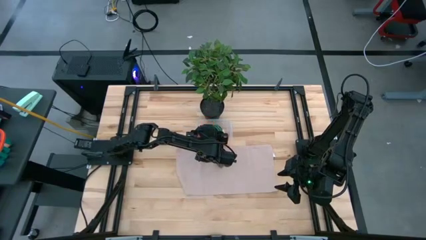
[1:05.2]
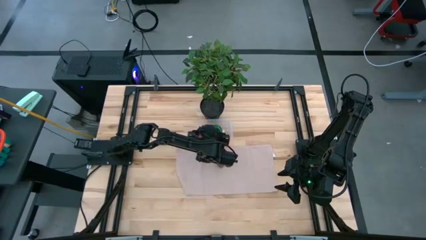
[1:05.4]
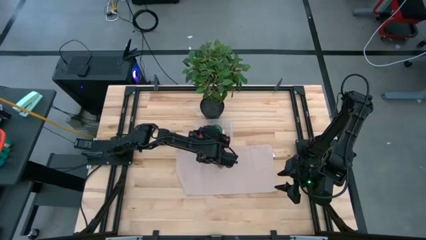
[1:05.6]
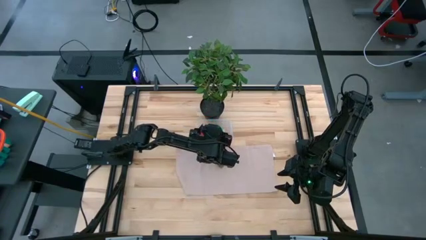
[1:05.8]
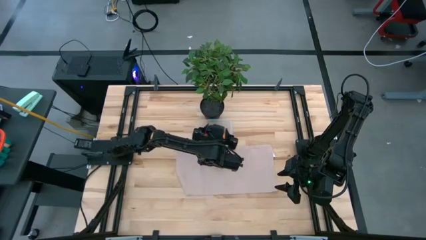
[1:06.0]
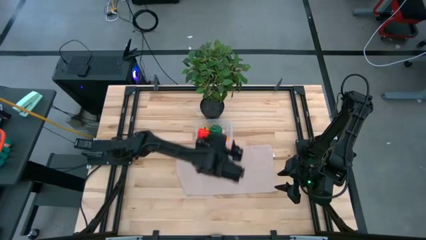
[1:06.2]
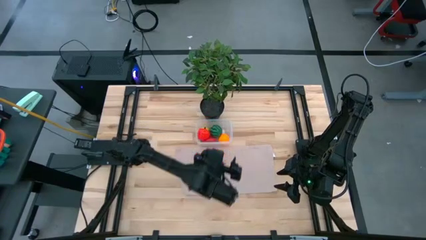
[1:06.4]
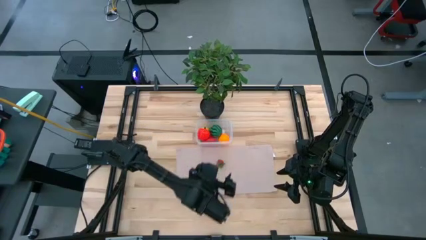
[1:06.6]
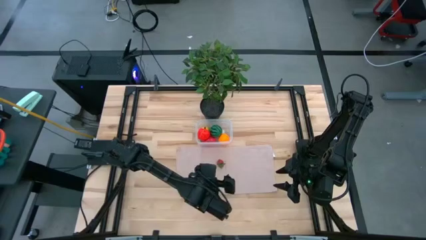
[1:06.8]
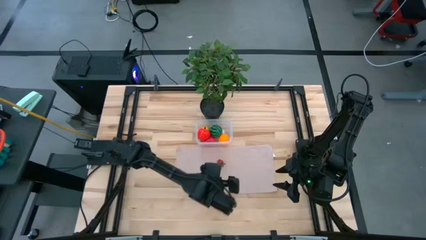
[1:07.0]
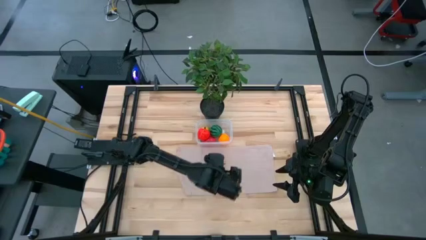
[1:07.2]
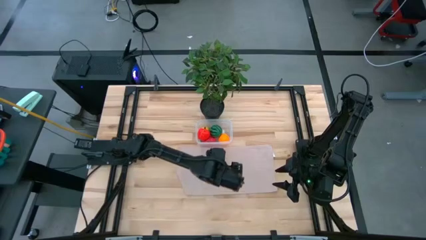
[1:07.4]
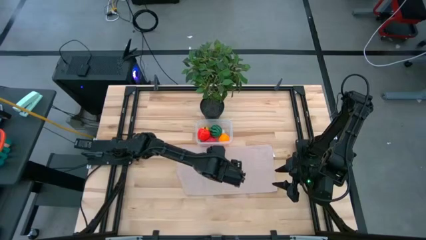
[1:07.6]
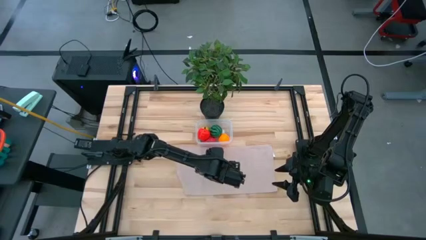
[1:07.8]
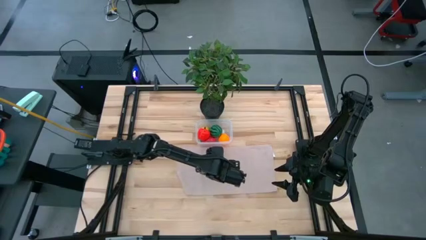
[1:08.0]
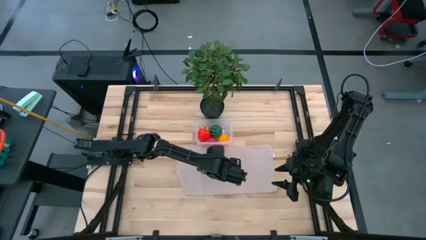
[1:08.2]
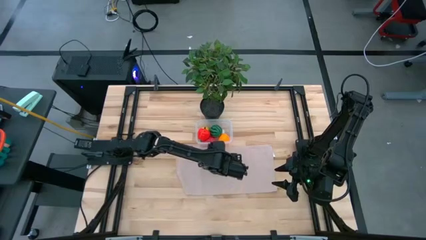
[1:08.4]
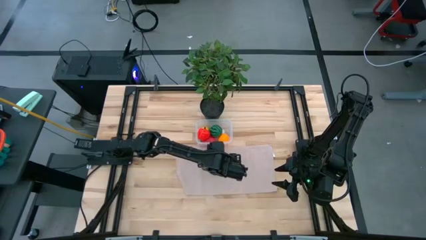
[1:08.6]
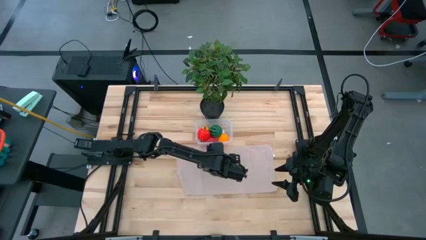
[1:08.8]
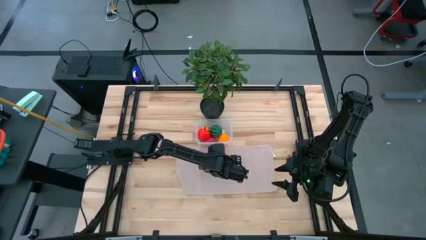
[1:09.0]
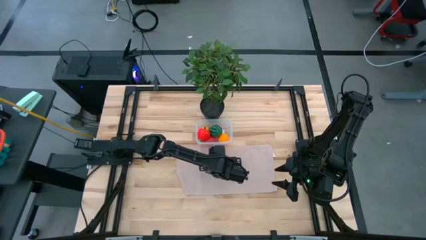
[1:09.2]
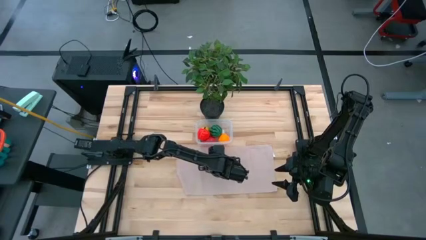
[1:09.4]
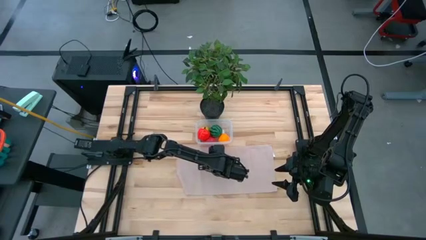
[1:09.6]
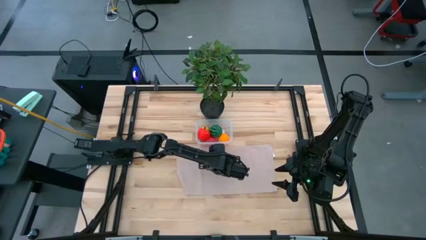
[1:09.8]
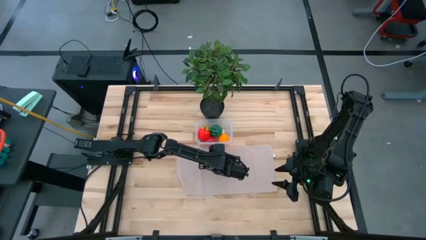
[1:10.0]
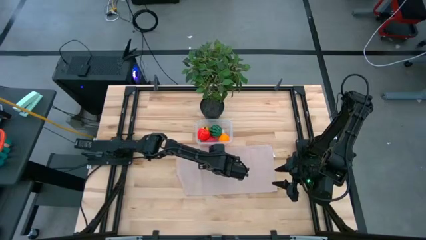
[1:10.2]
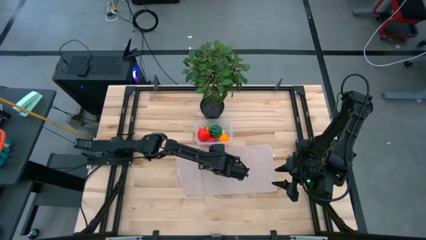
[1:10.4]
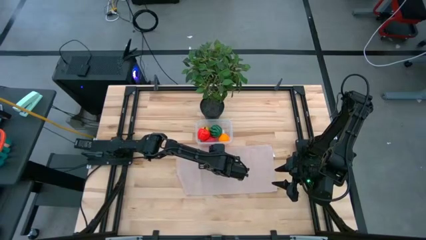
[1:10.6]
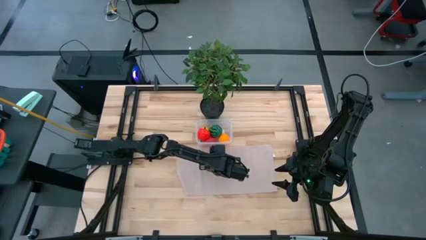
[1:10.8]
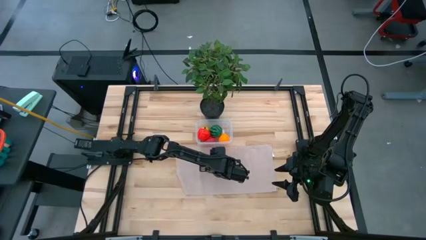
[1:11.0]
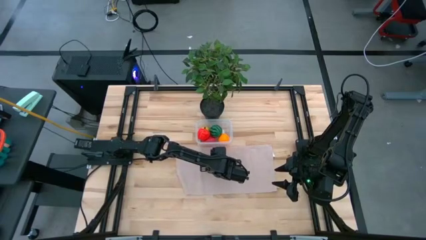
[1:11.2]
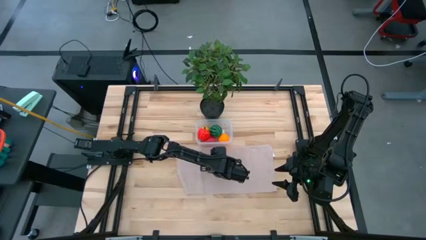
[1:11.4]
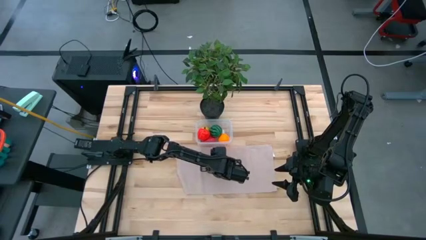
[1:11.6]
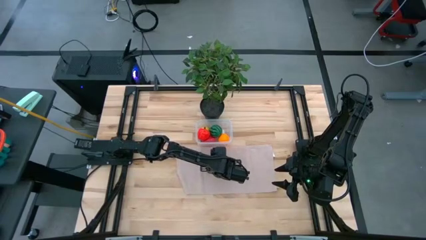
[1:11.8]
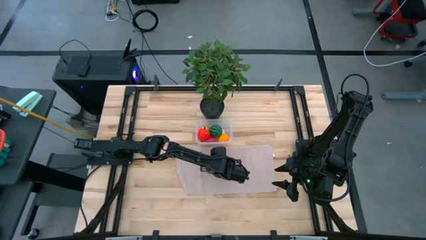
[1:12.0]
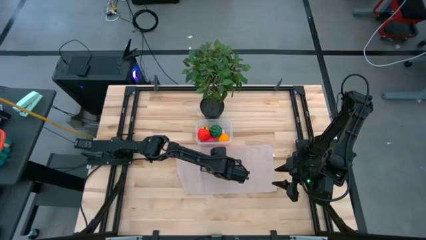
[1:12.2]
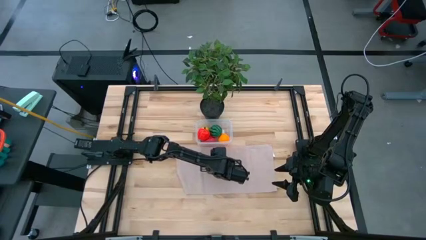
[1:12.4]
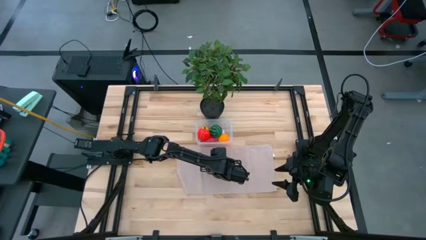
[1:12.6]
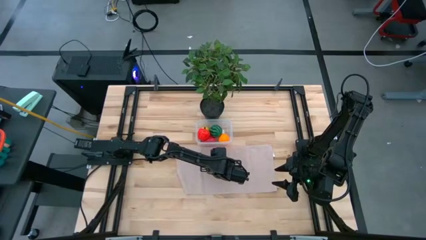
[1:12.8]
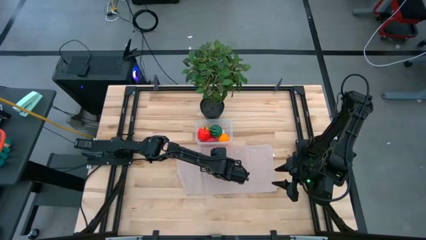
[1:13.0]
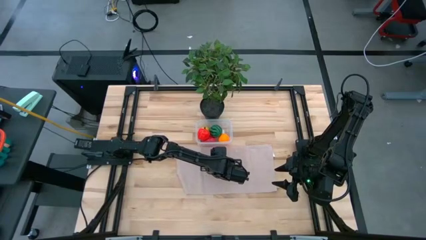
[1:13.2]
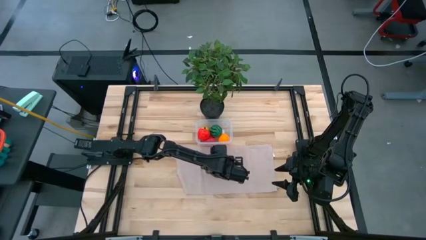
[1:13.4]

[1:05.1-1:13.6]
Task: Pick and placing Produce into tupperware
Put the strawberry into the transparent bin

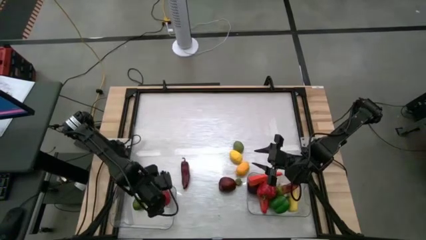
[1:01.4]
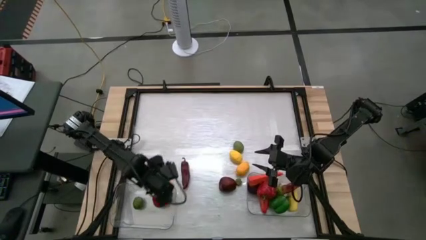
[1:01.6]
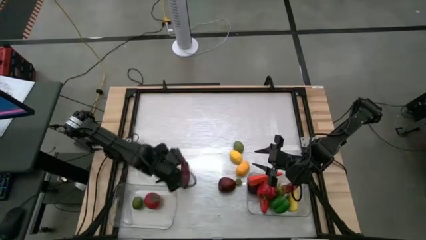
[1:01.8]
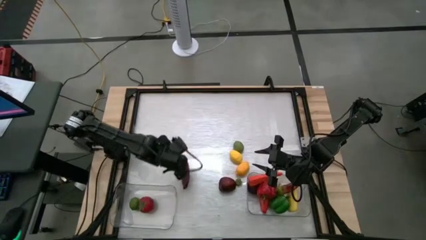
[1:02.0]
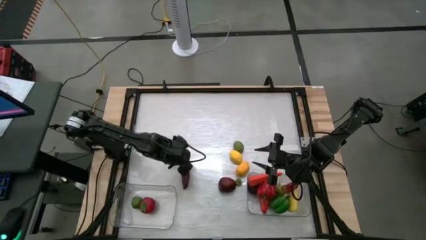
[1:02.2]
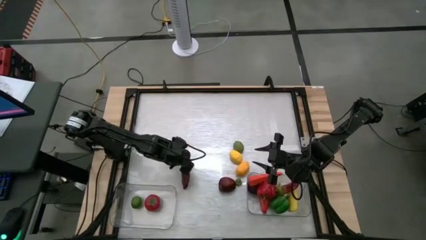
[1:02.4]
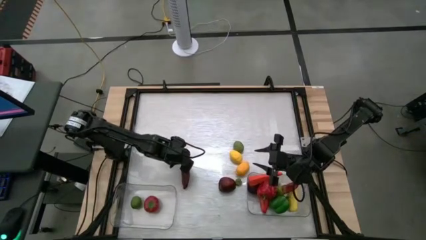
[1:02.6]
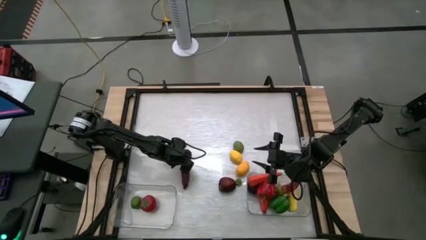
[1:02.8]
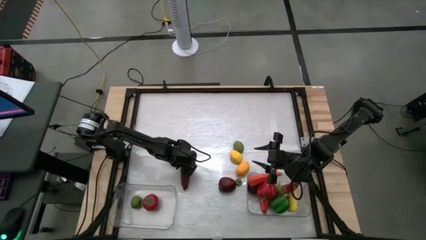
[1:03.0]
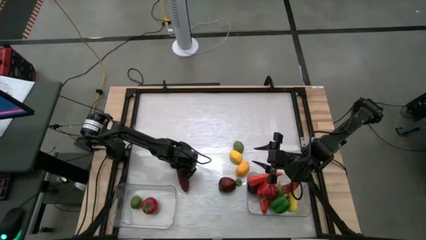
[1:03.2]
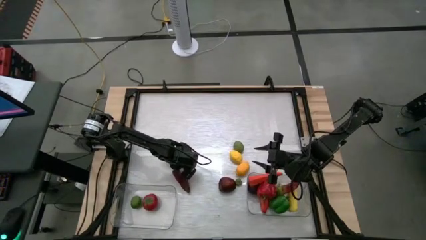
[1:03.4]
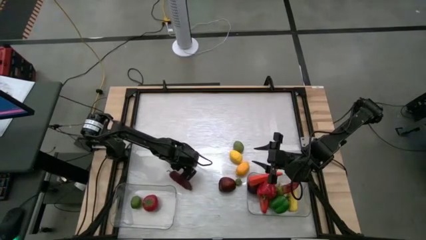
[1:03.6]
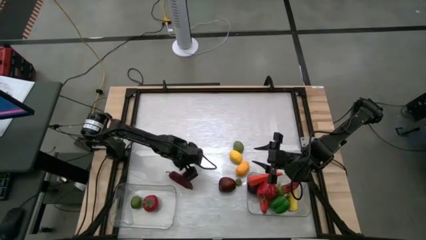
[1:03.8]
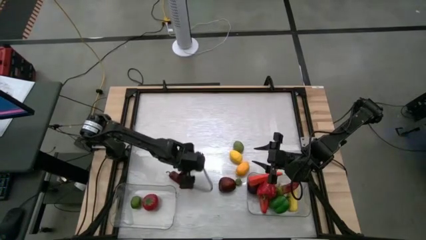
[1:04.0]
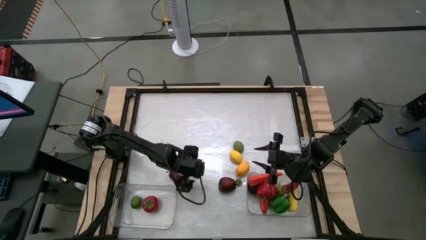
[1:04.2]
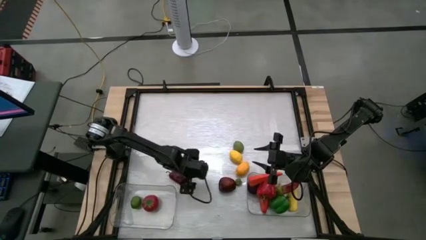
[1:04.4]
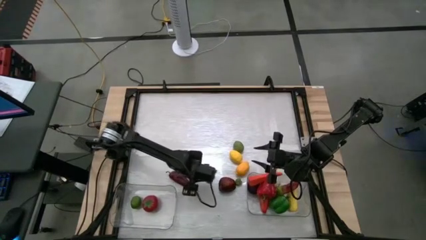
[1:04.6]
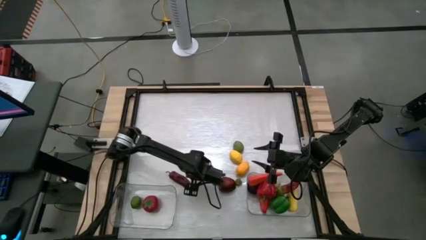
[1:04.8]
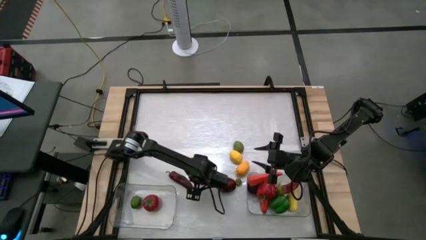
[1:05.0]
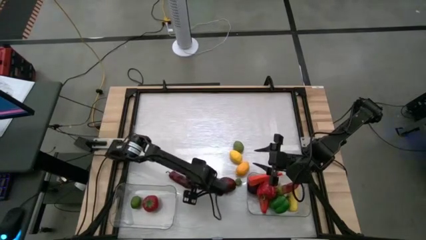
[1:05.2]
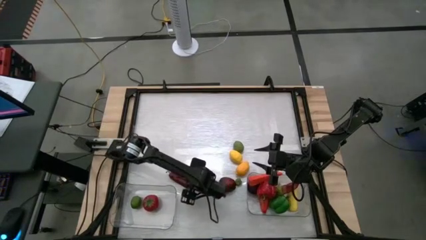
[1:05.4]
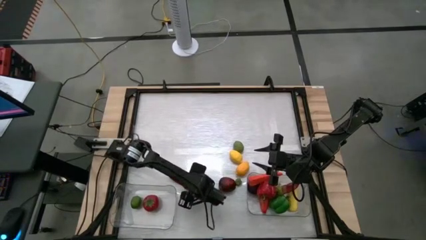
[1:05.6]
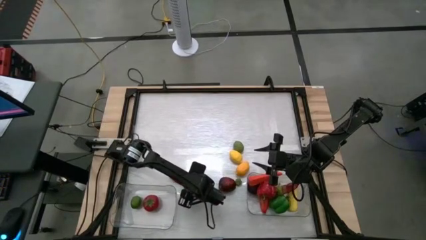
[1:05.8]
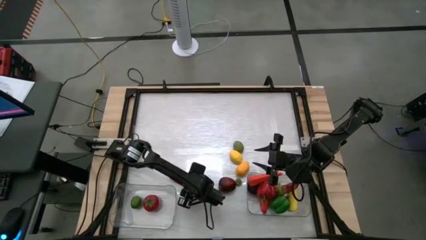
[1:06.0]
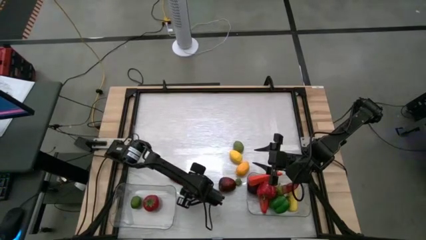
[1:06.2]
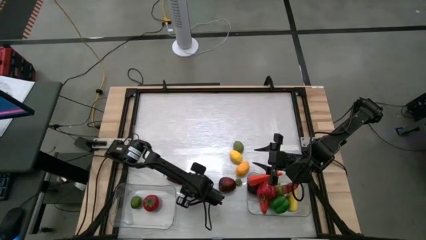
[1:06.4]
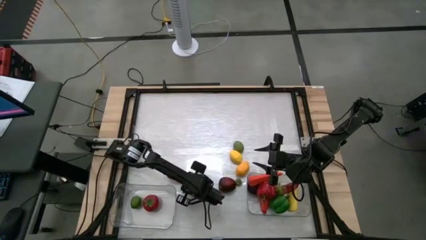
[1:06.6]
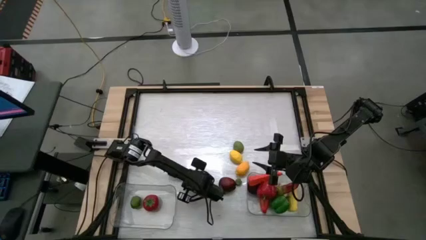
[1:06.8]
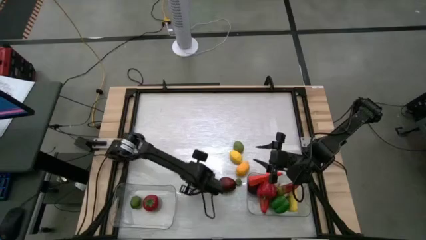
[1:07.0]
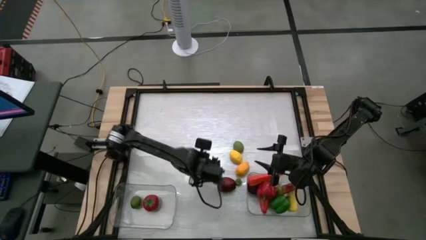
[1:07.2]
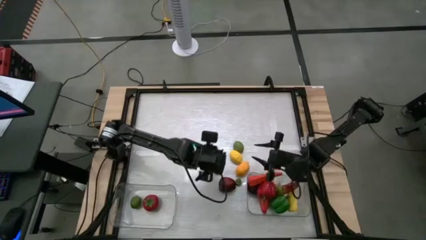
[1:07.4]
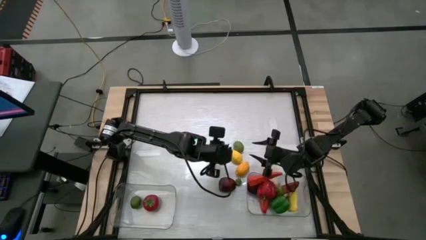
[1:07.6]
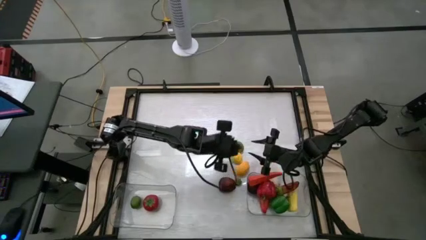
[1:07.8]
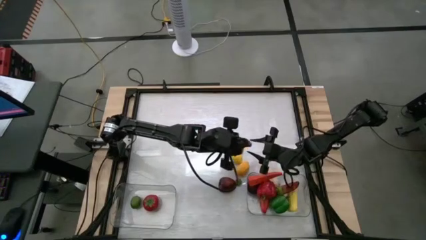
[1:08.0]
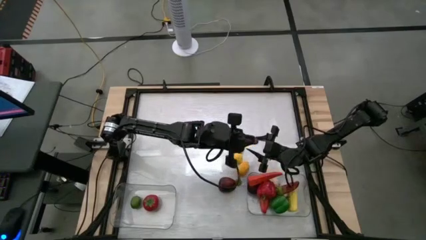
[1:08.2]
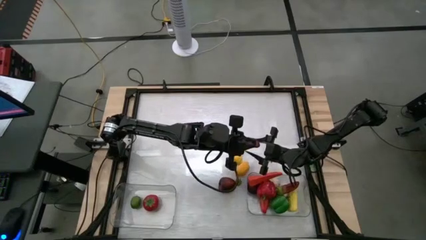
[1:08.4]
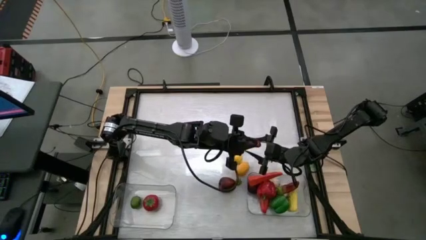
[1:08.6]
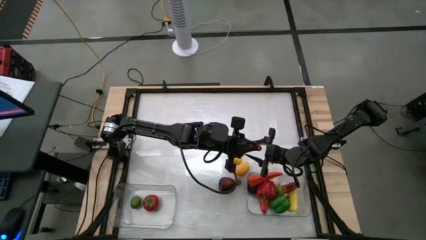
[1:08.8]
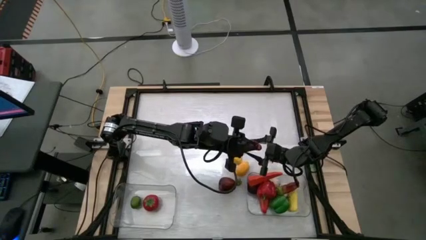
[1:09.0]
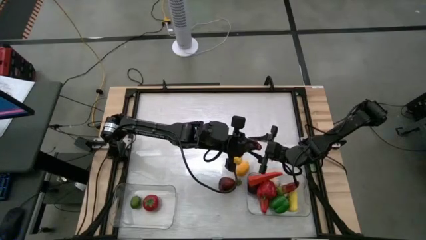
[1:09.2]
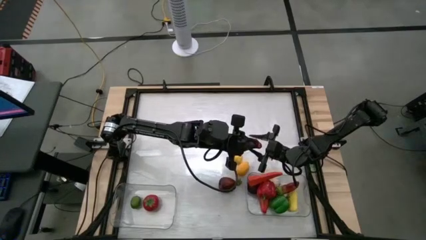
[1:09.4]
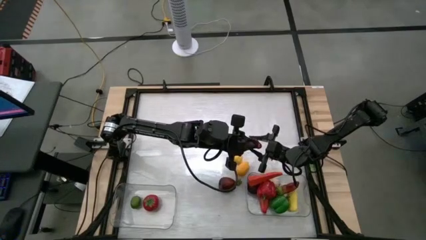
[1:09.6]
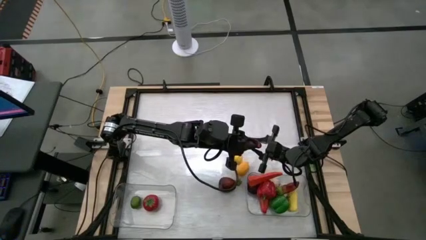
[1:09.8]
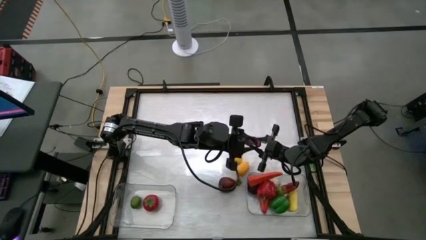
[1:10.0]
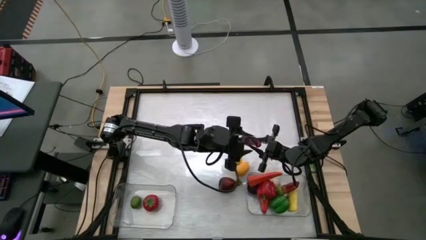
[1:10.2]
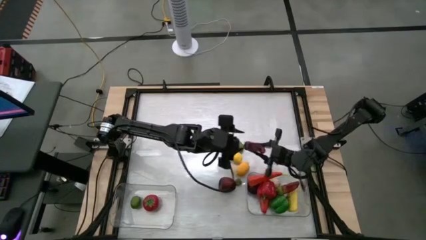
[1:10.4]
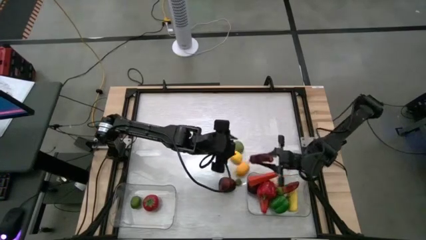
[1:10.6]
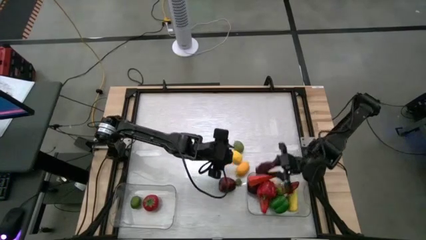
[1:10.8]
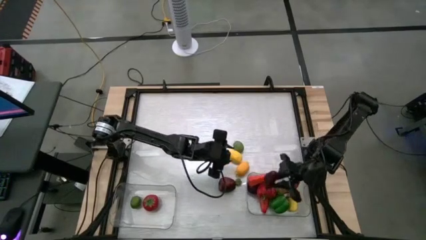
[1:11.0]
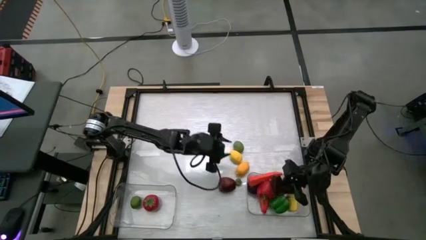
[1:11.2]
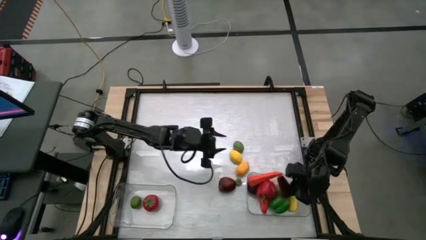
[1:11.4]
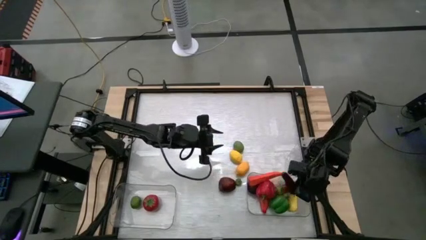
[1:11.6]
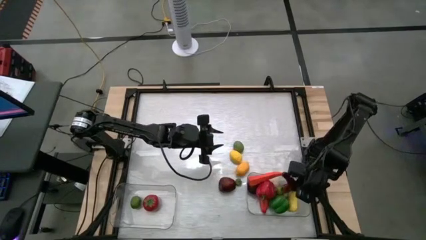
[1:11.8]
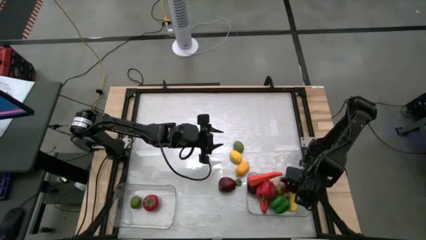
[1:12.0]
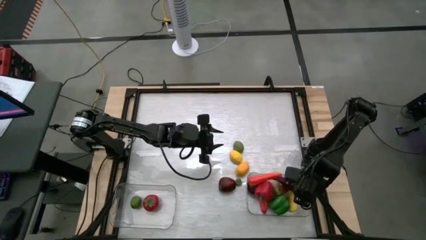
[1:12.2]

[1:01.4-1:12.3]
Task: Sort produce into baskets
Put the red pepper into the right transparent bin
